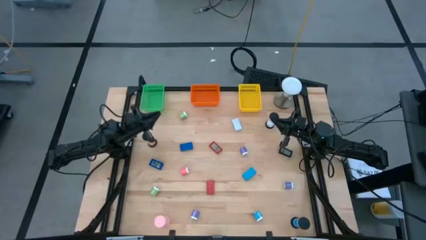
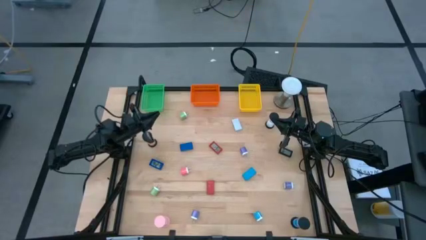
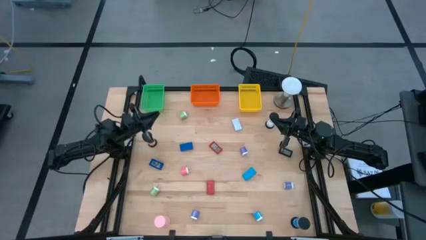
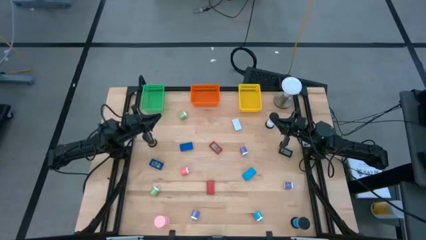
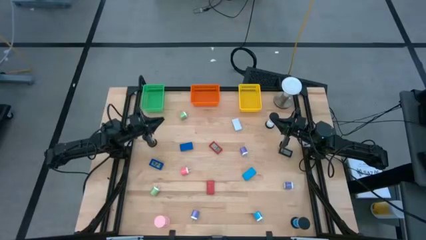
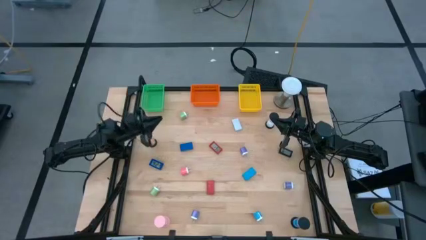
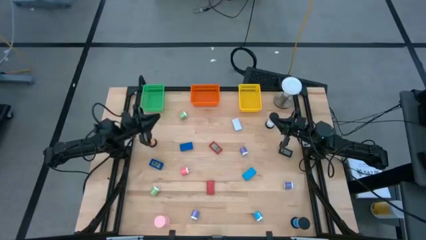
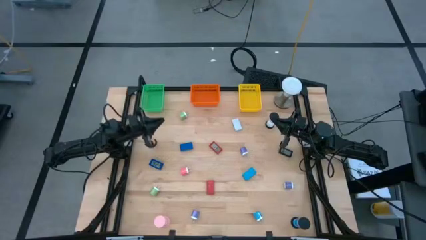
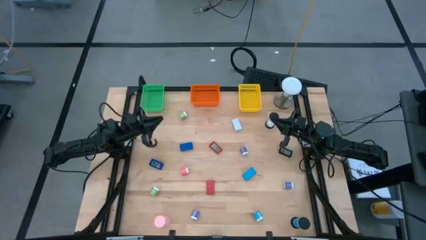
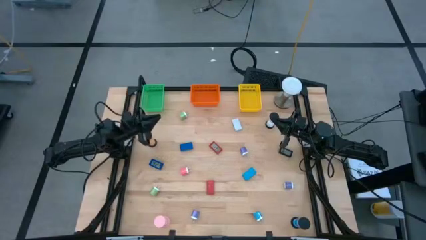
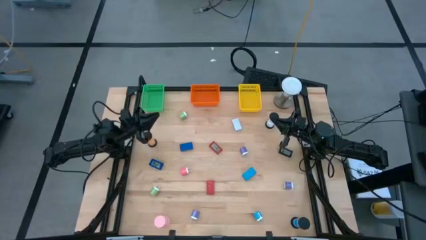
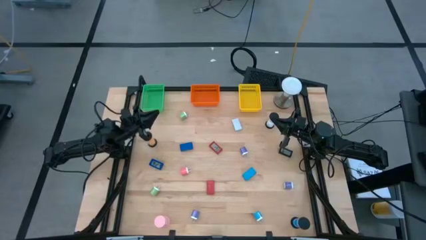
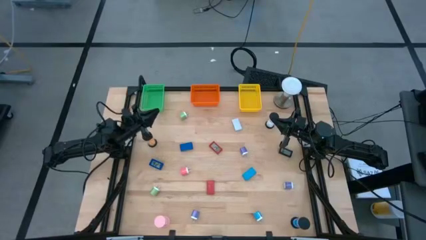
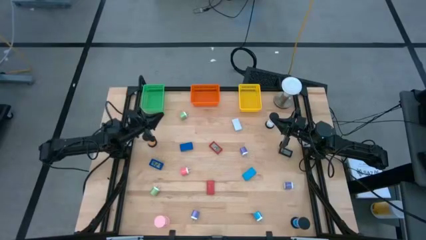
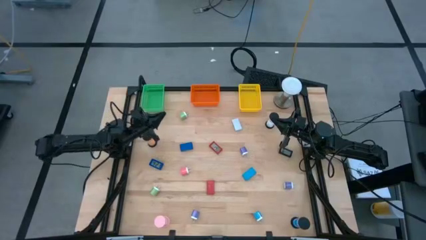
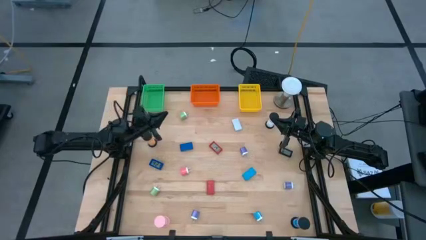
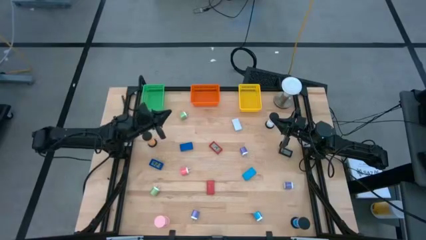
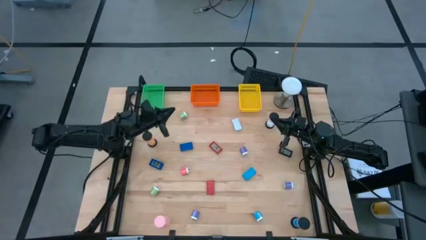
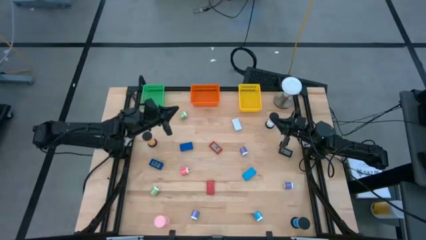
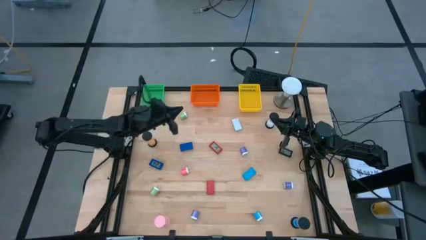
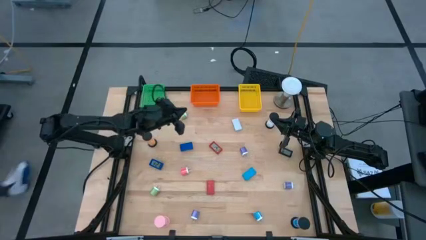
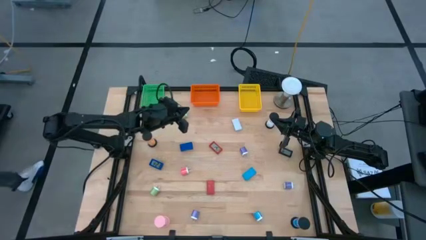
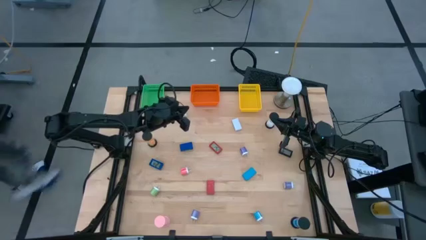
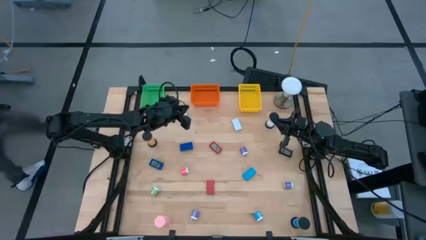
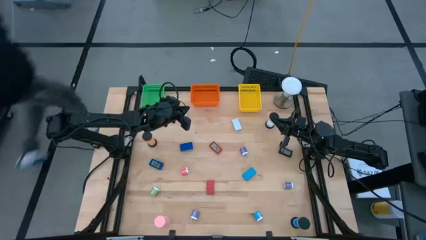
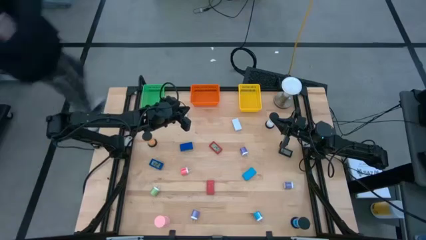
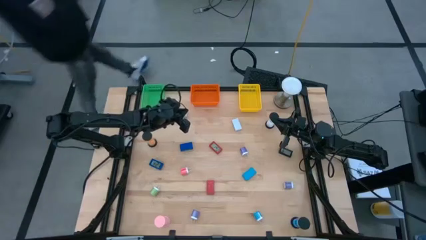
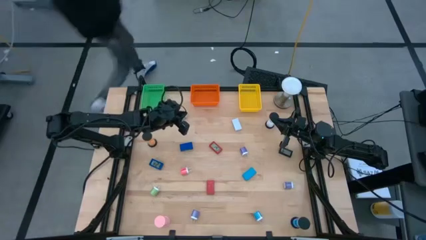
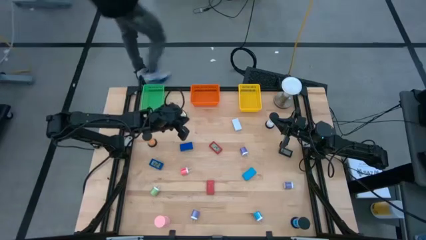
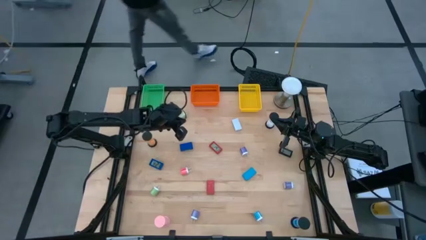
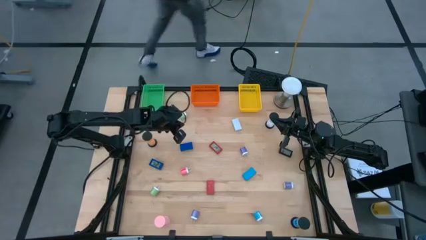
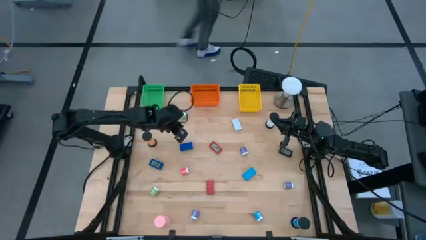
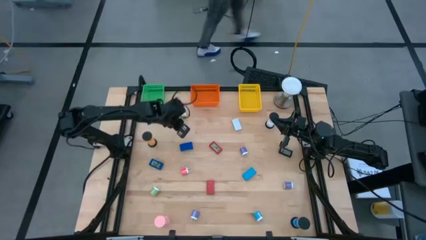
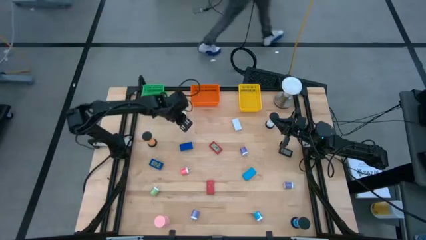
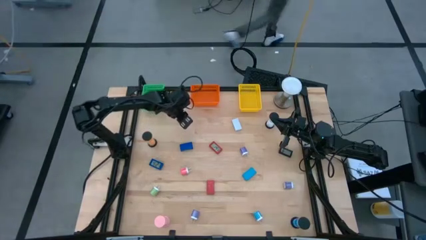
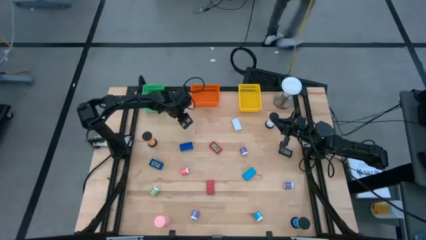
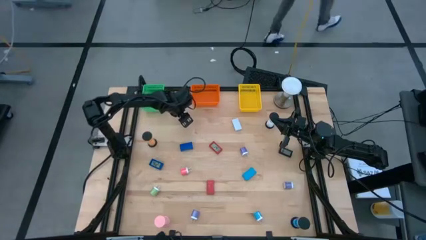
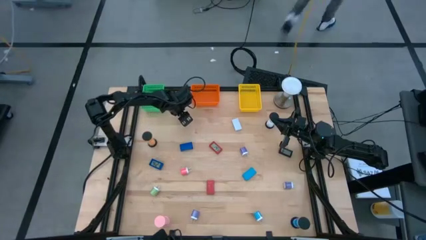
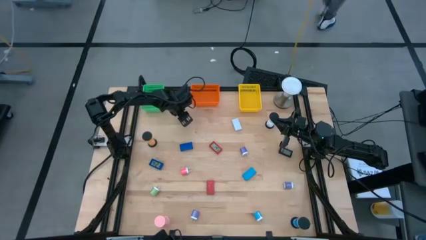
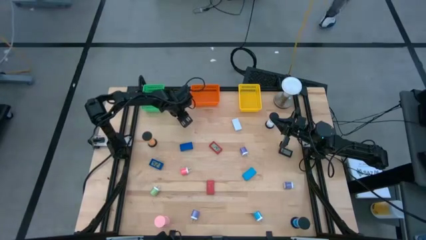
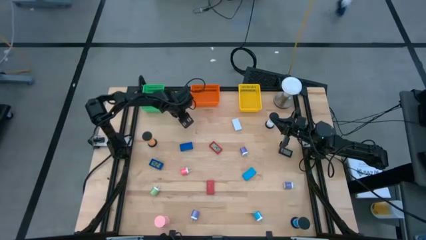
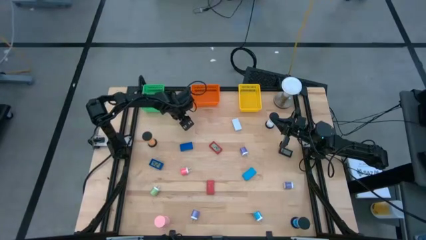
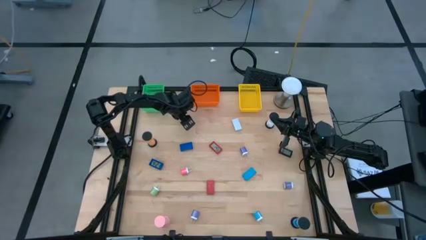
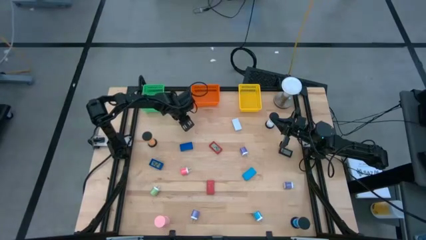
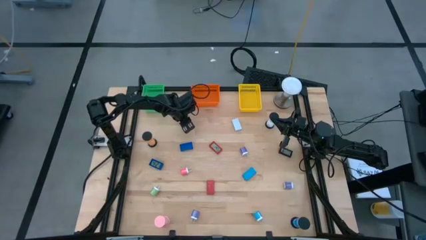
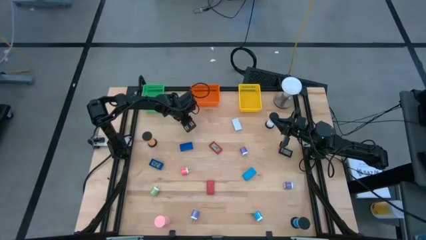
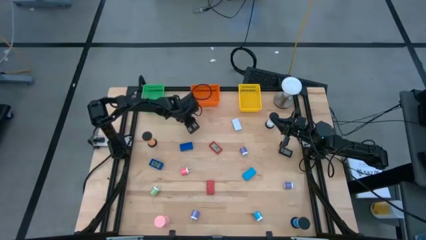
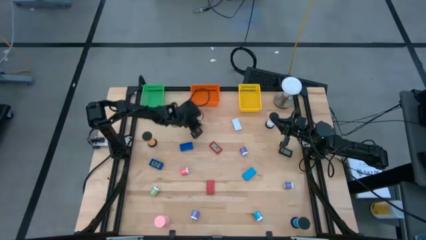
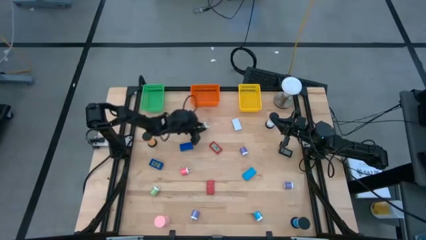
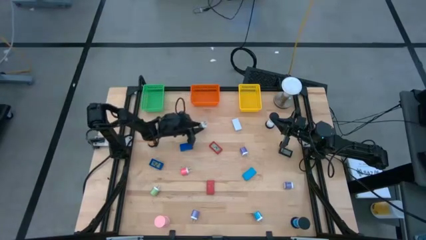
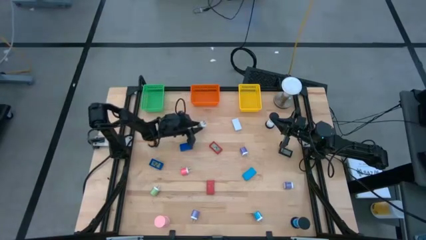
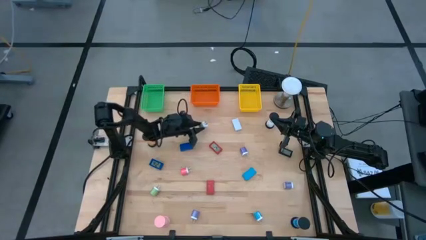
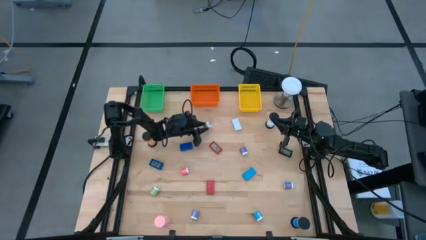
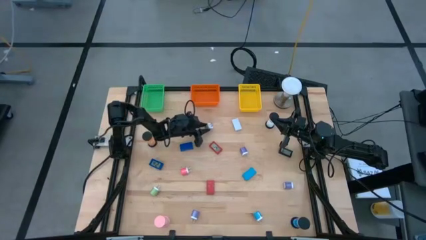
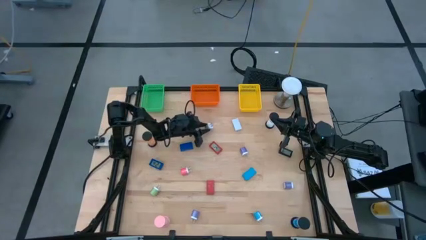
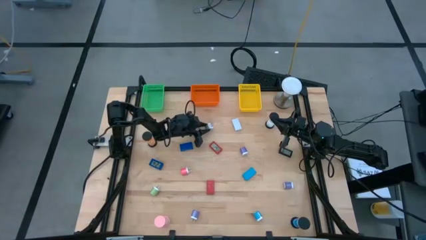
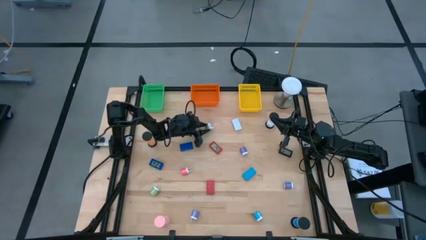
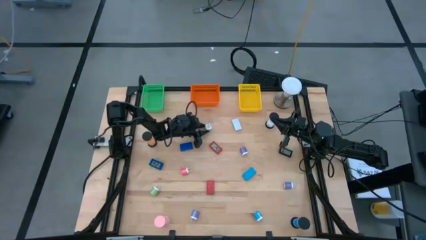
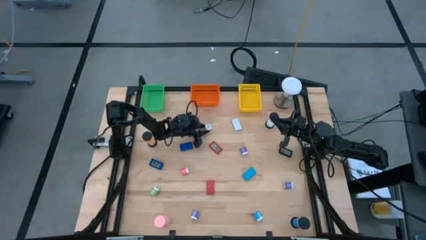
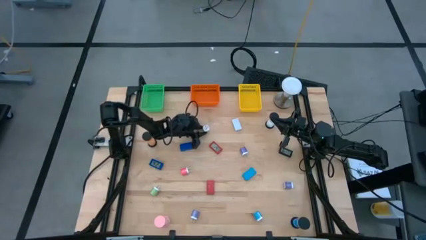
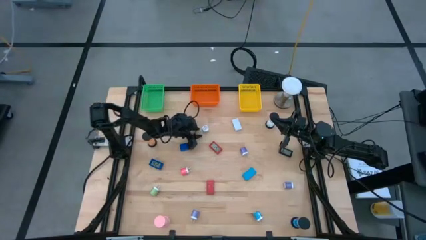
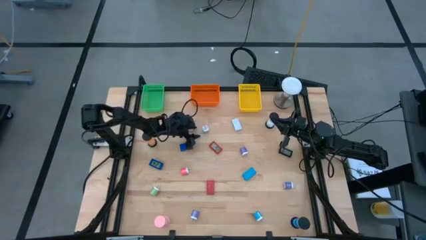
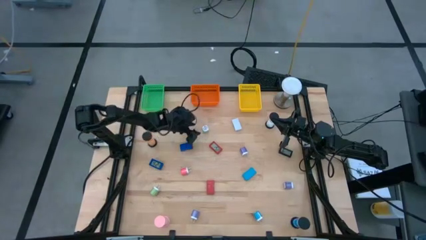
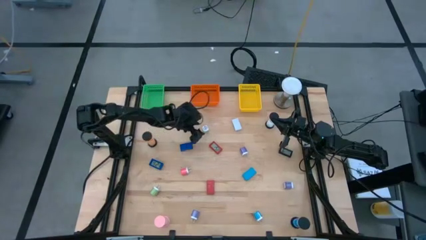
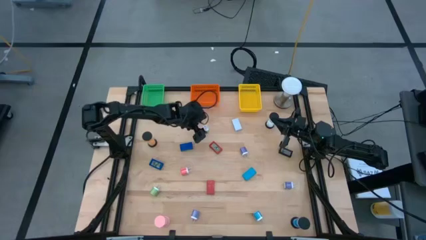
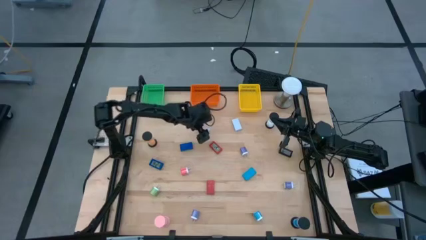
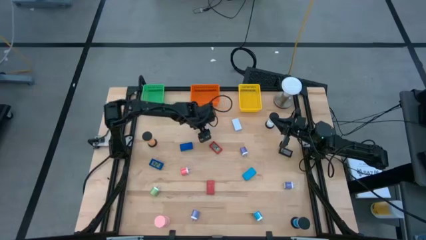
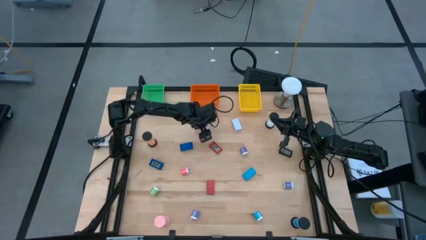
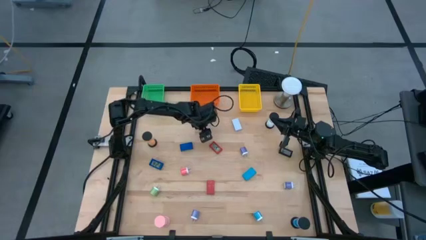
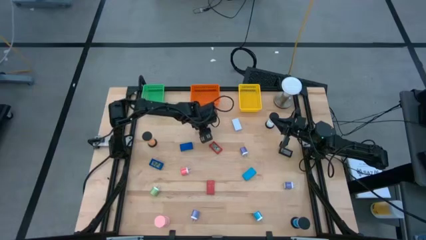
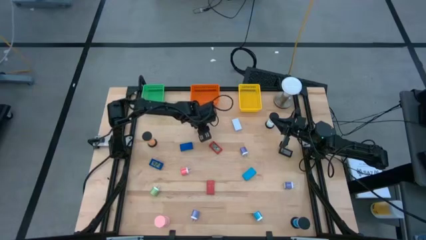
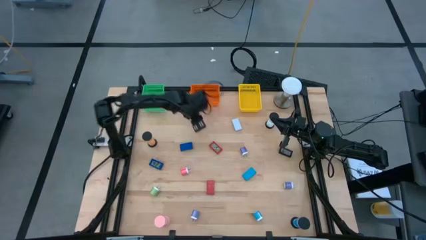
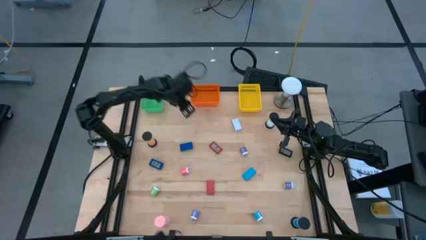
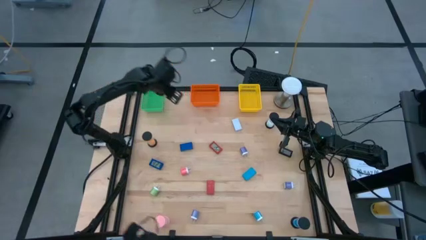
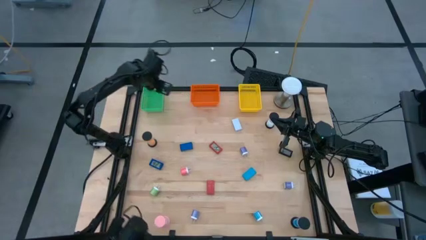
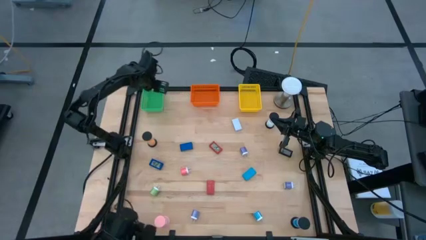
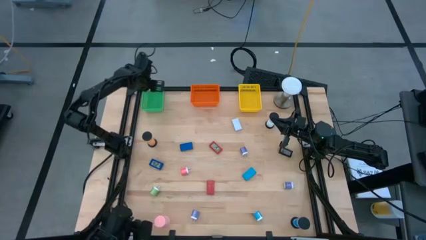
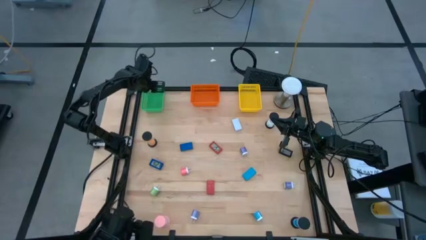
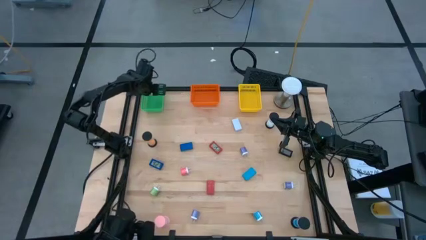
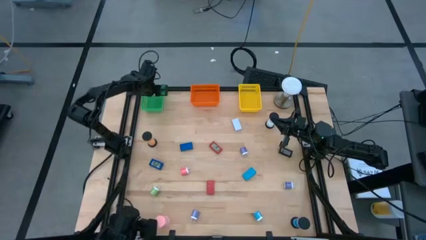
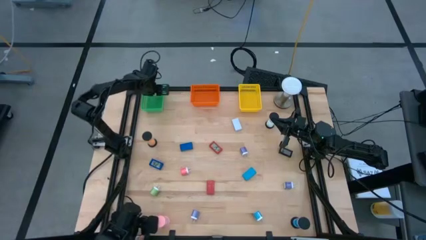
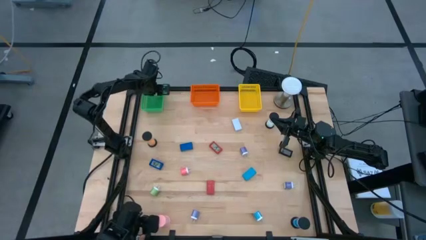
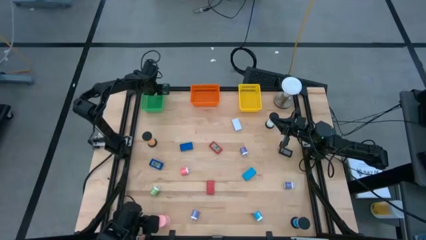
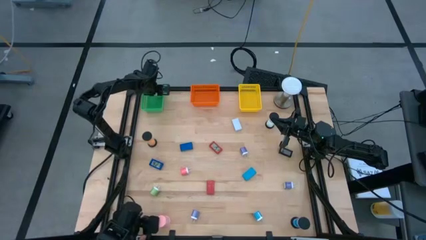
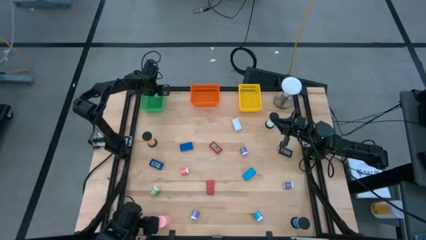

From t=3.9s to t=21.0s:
Task: Pick & Place Office items
Put the top green charger adaptor into the green bin
